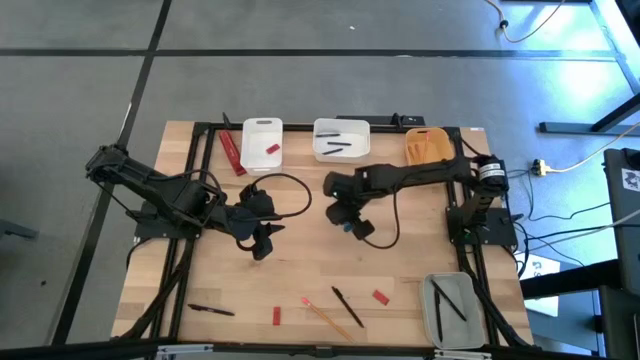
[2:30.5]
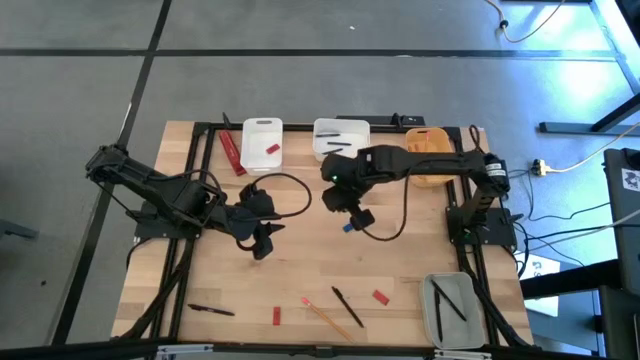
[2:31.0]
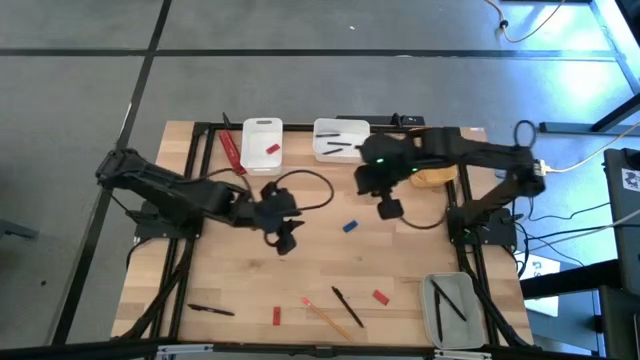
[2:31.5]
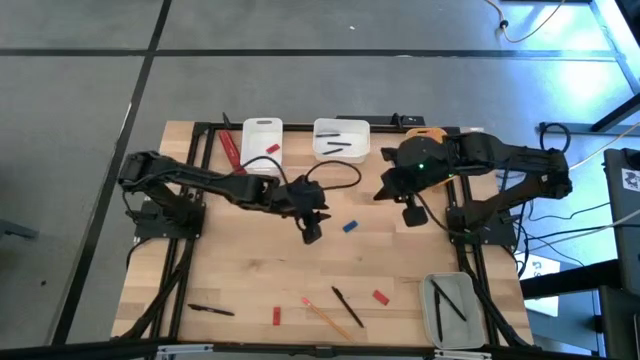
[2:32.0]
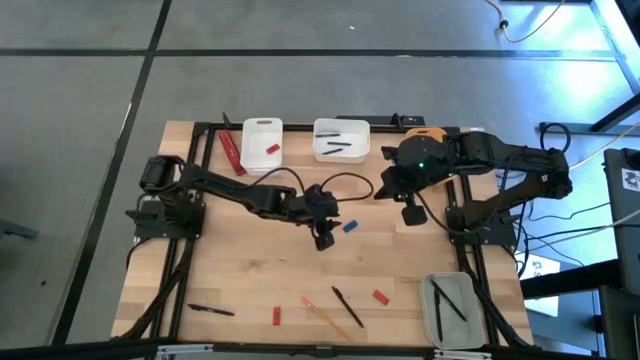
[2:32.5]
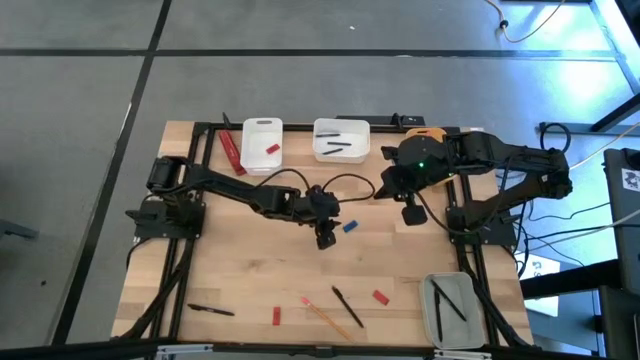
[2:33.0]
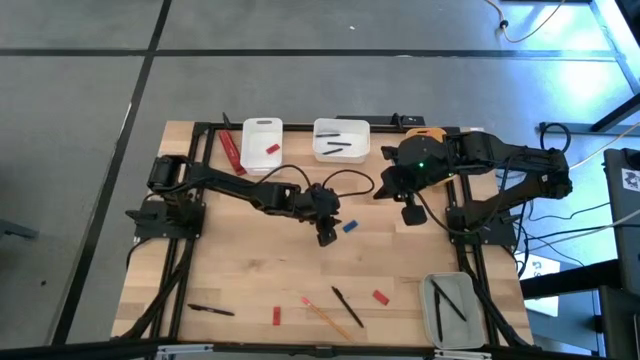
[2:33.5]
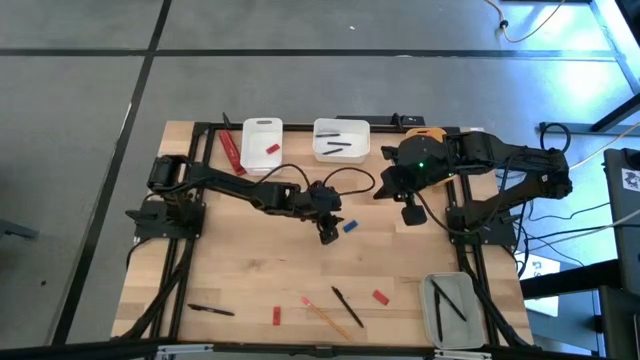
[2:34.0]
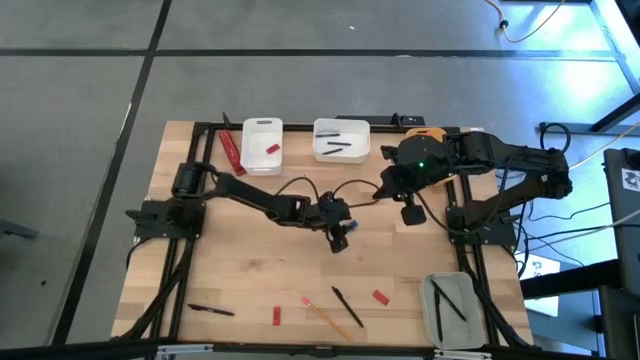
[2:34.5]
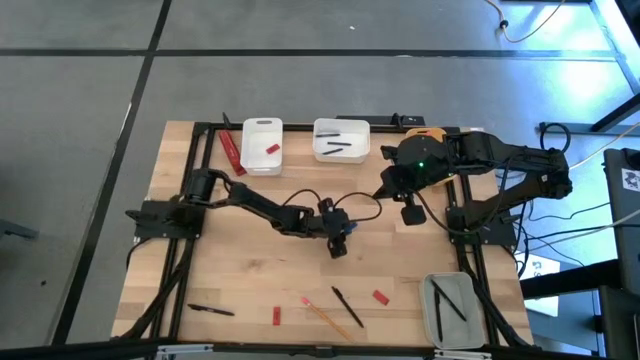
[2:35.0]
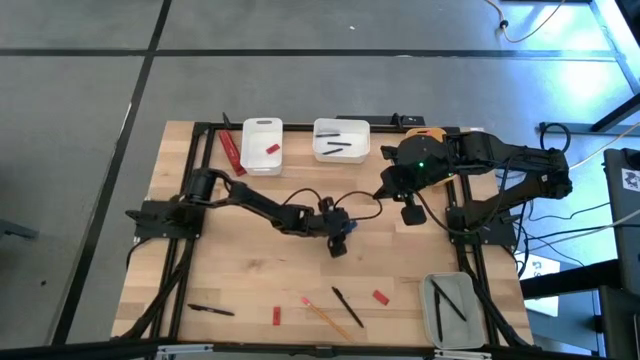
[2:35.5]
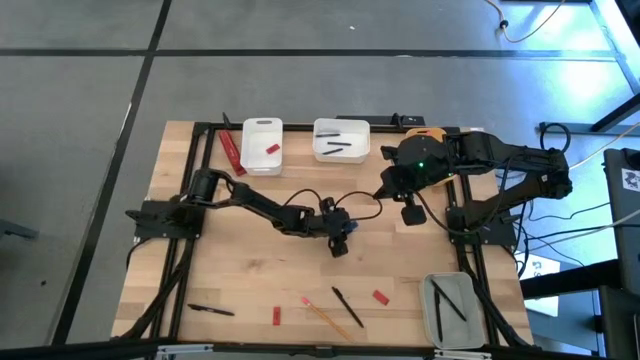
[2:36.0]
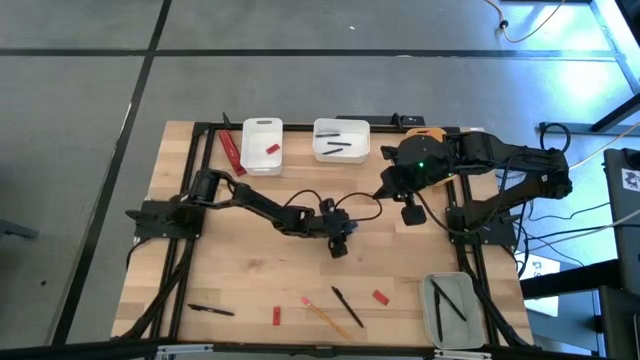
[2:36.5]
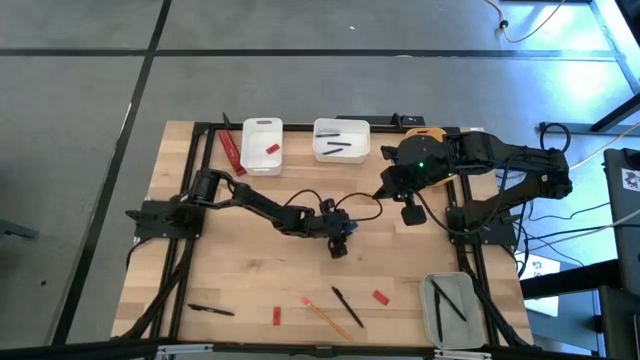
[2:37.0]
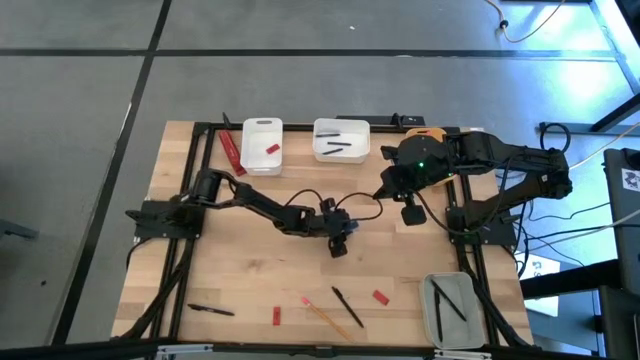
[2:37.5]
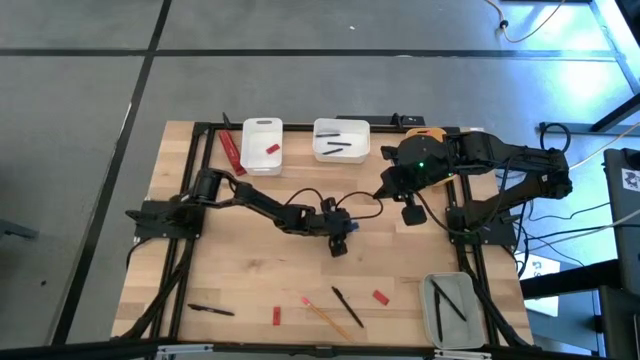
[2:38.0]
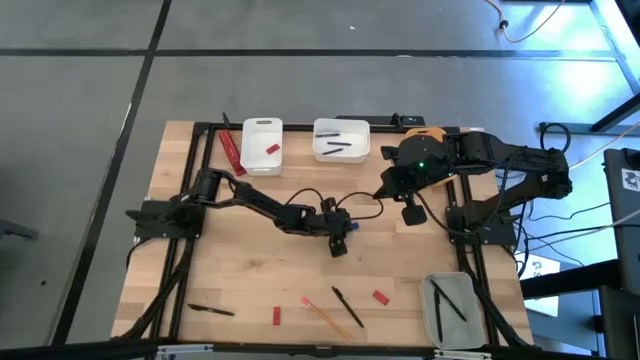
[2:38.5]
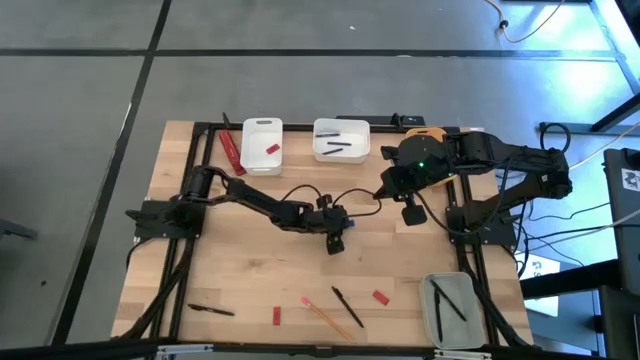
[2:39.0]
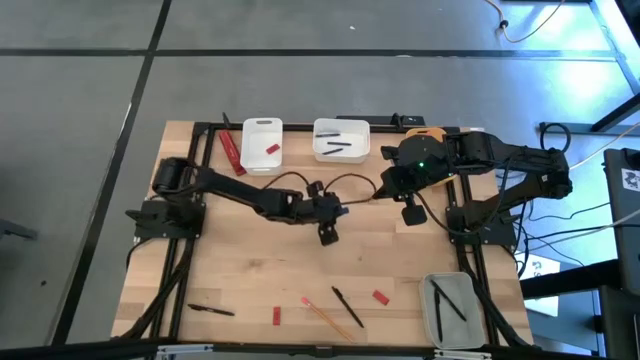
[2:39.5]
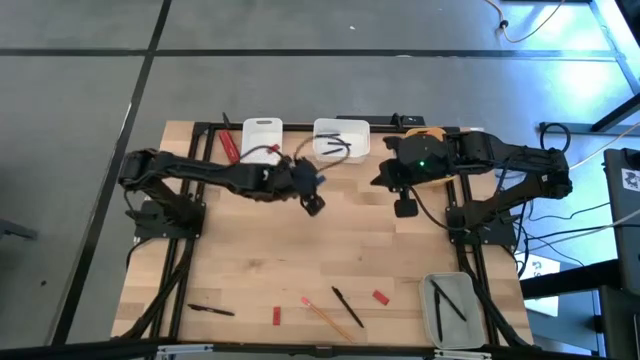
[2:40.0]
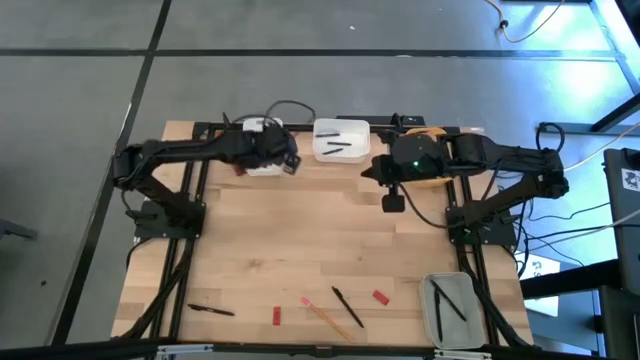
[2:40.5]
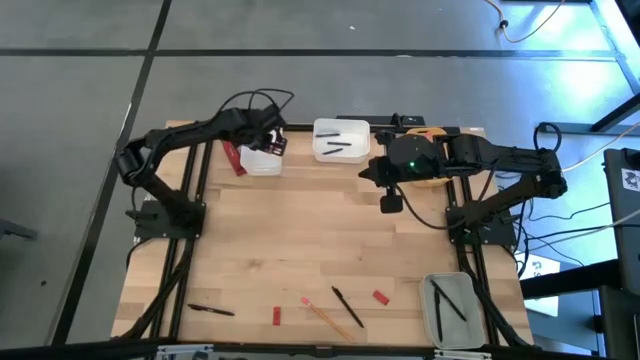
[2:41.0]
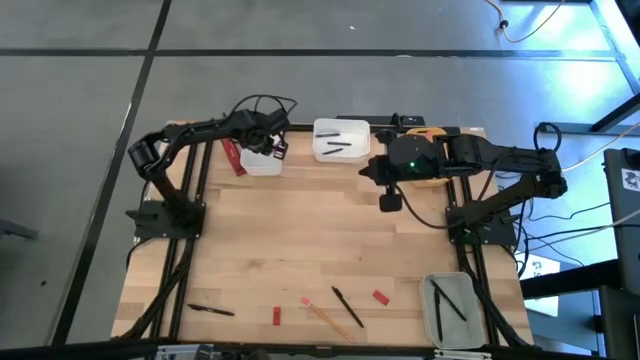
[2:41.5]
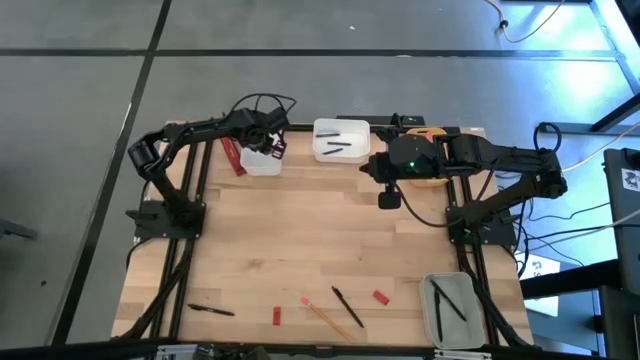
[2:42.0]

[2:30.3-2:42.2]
Task: Sort crayons/erasers/pens/pencils in bins
Put the blue eraser into the left white bin

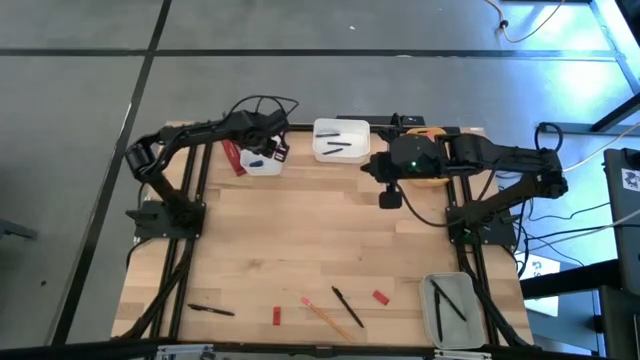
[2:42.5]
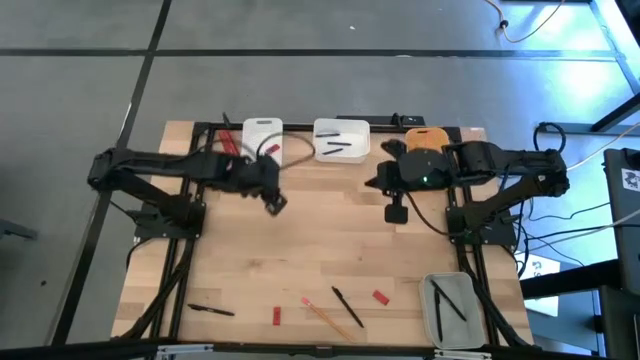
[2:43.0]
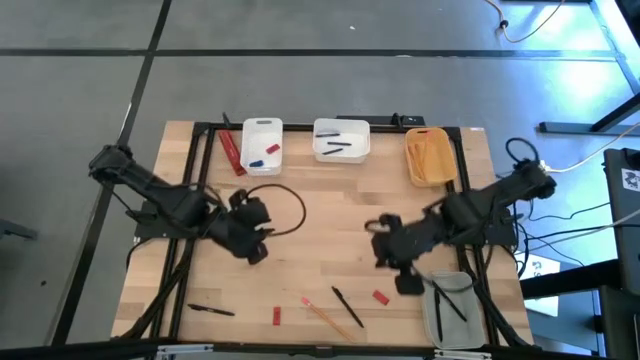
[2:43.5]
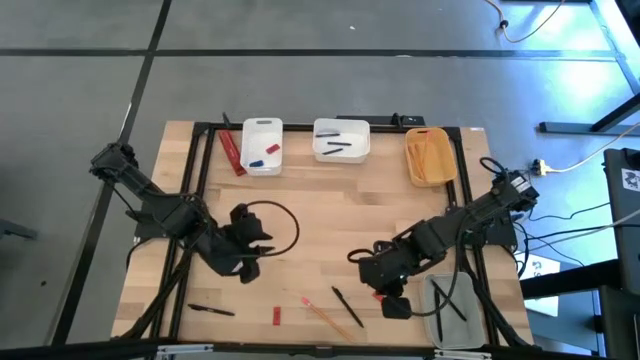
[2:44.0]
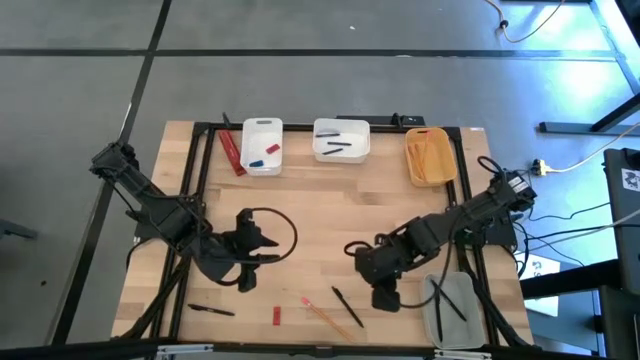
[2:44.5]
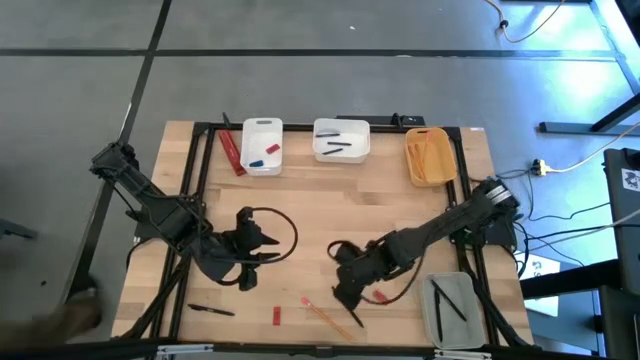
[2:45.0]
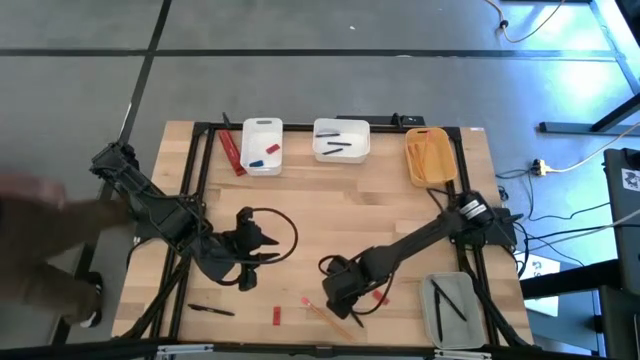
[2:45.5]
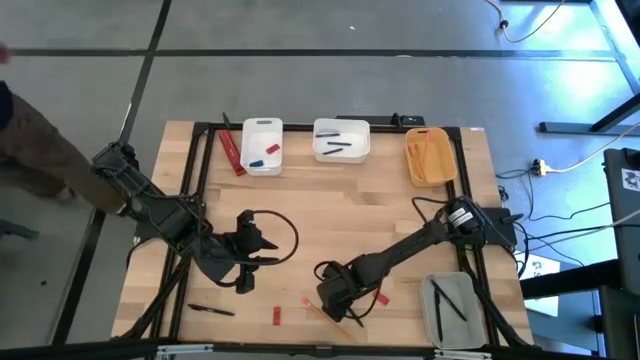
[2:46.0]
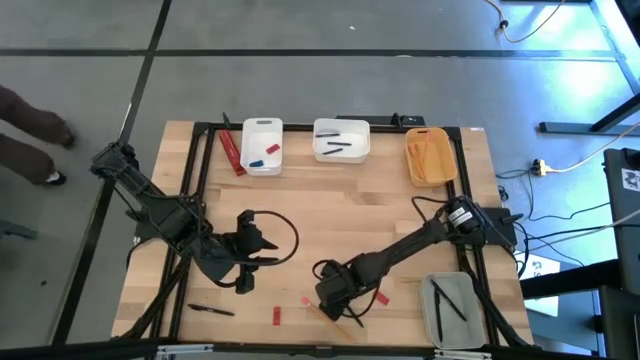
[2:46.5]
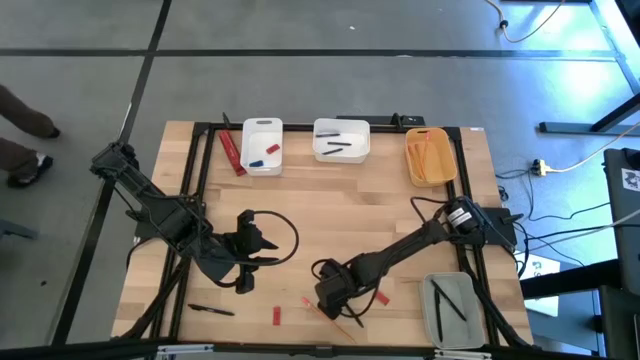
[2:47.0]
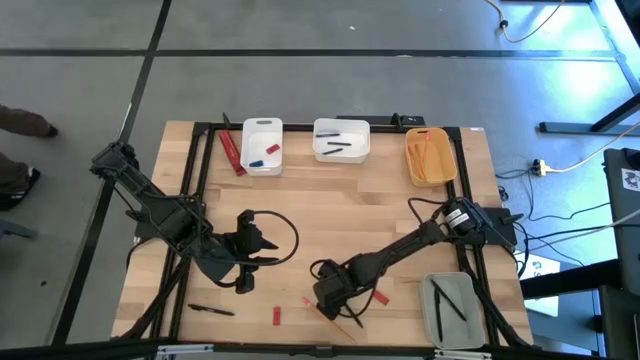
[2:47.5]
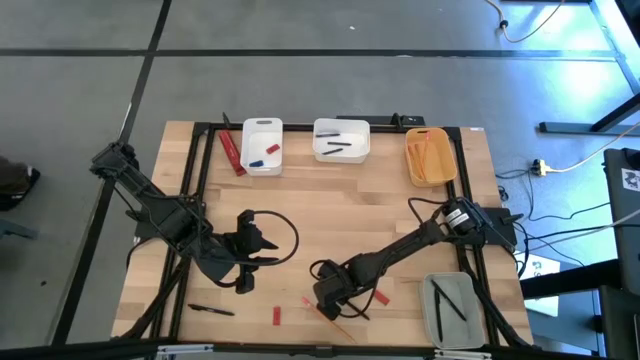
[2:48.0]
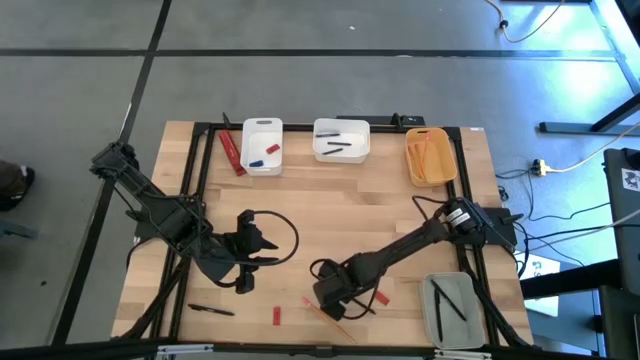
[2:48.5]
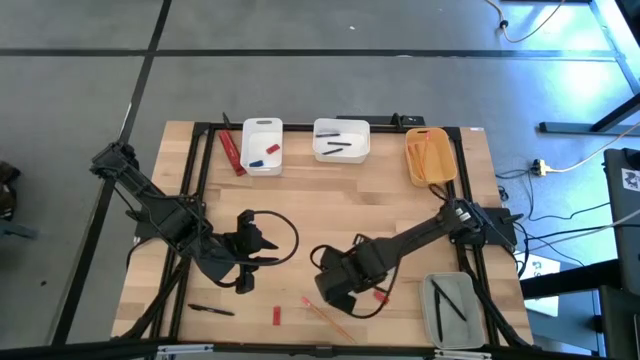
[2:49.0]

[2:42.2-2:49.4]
Put the black pen into the gray bin

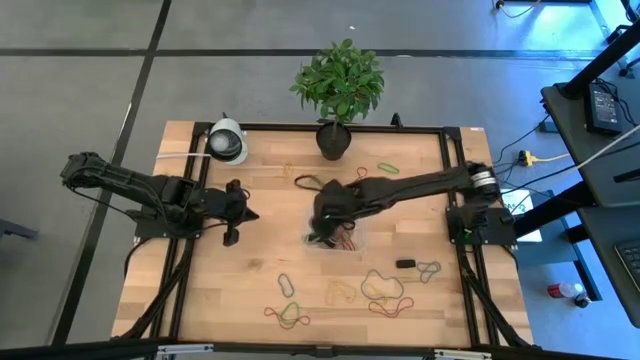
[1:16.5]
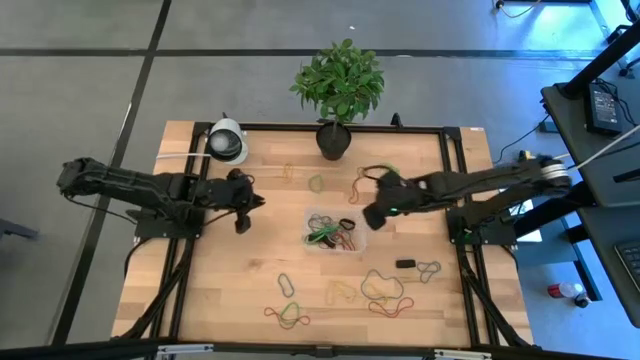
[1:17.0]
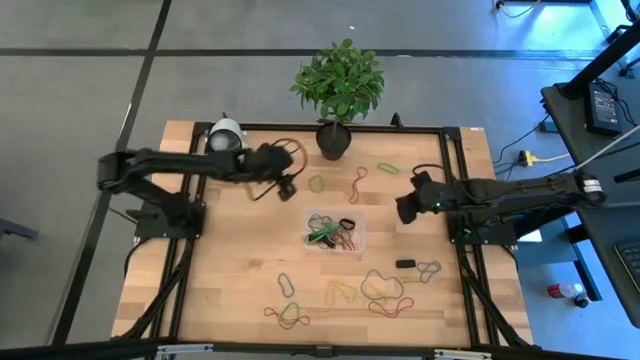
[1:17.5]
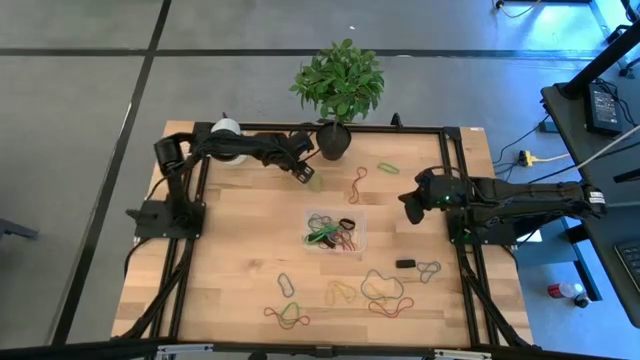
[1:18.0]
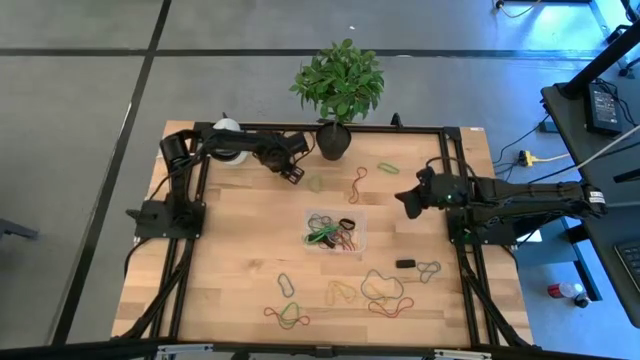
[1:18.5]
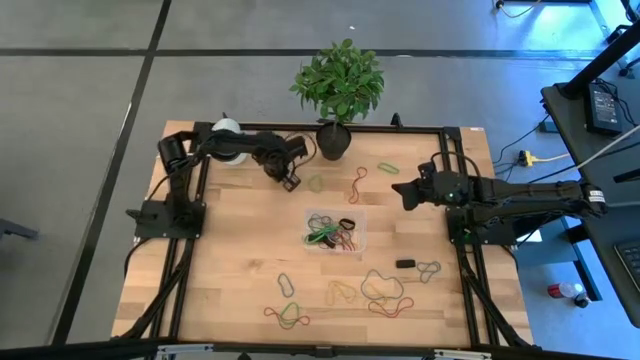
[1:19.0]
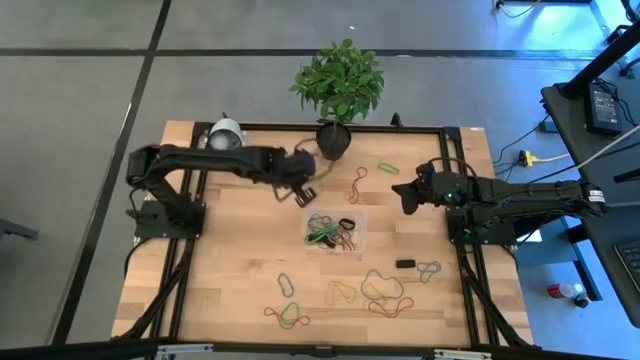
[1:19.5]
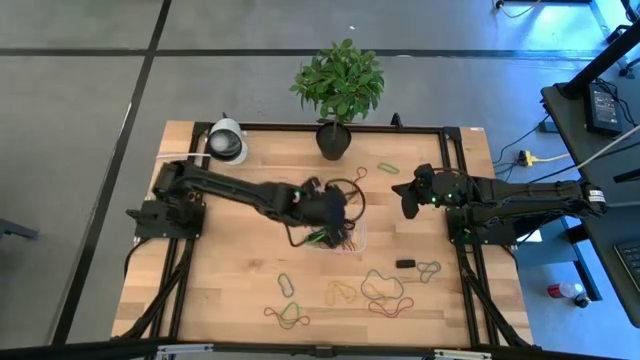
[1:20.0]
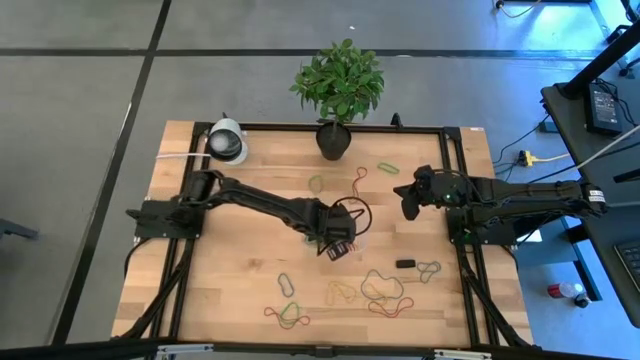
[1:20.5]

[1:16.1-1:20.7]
Task: Pick and place rubber bands into bin
Put the yellow rubber band into the bin
